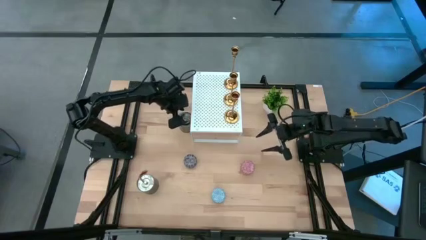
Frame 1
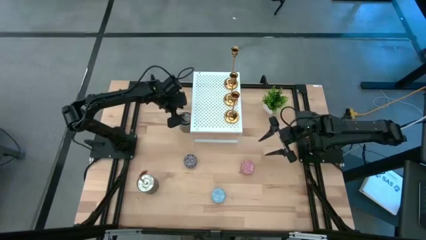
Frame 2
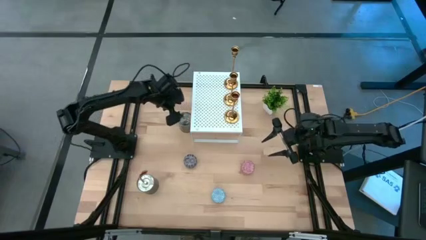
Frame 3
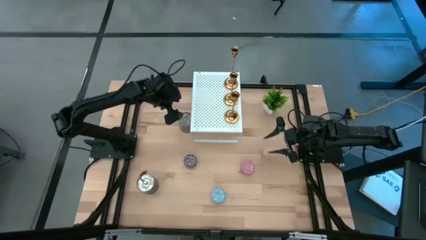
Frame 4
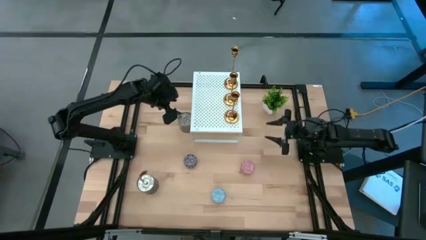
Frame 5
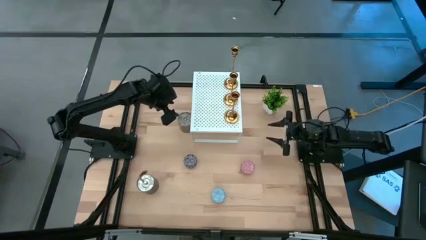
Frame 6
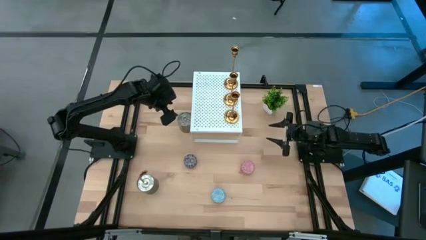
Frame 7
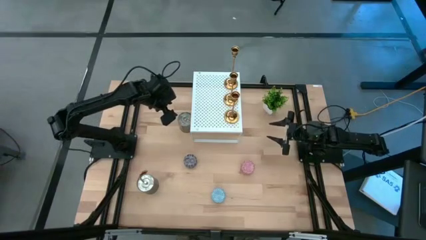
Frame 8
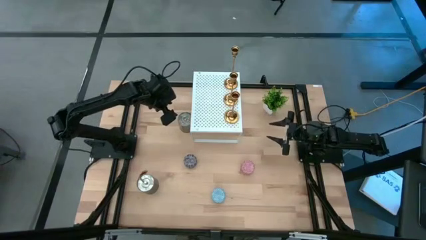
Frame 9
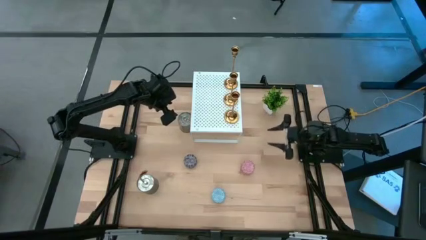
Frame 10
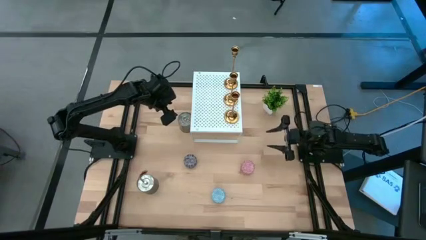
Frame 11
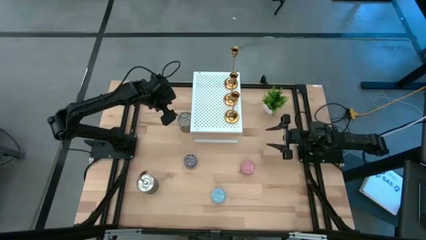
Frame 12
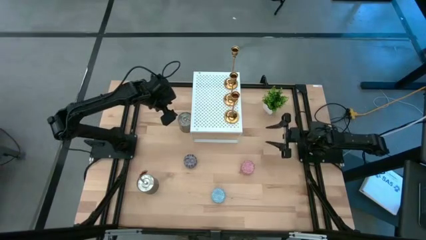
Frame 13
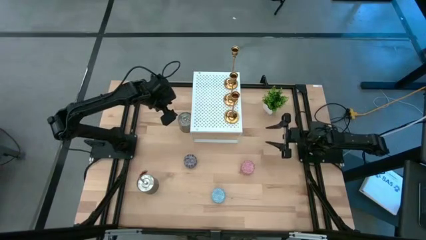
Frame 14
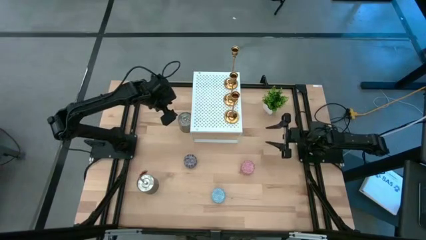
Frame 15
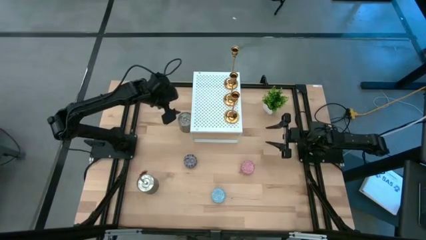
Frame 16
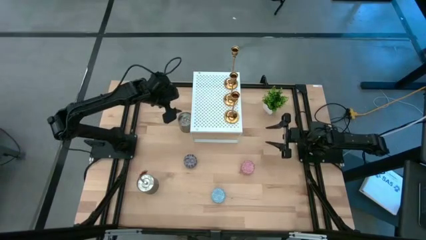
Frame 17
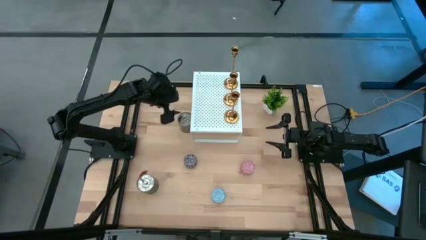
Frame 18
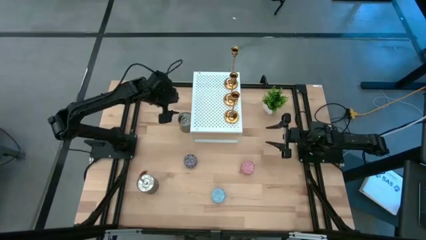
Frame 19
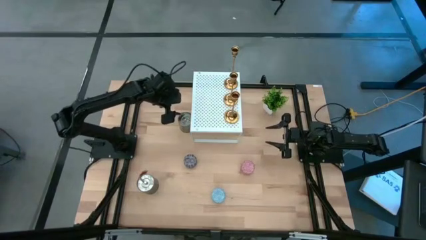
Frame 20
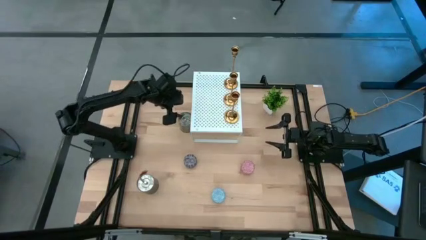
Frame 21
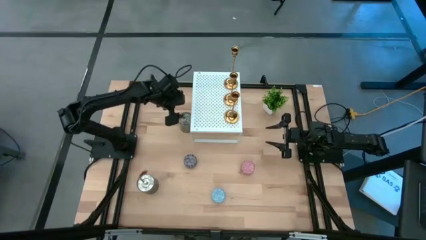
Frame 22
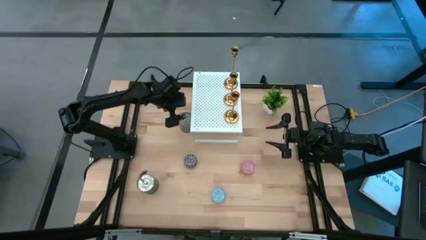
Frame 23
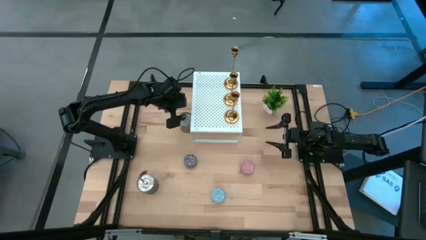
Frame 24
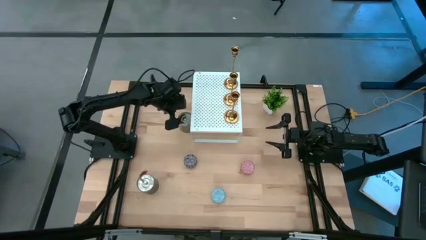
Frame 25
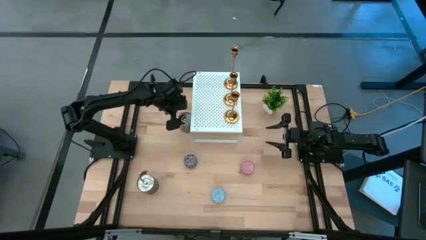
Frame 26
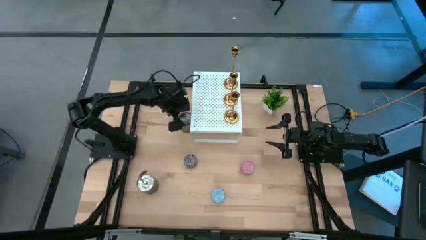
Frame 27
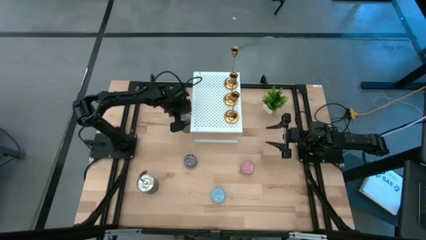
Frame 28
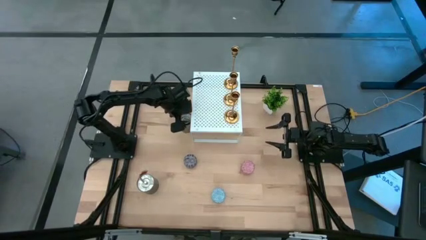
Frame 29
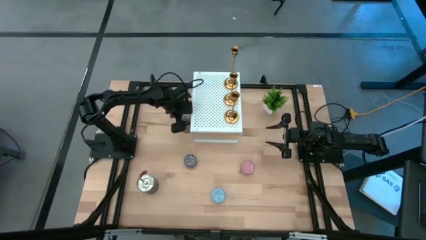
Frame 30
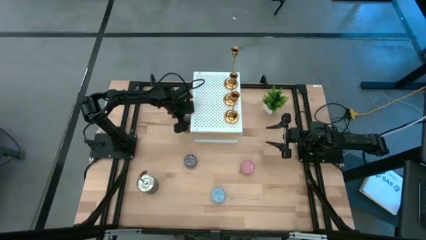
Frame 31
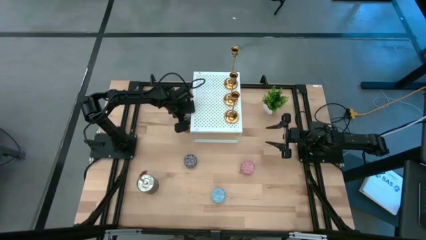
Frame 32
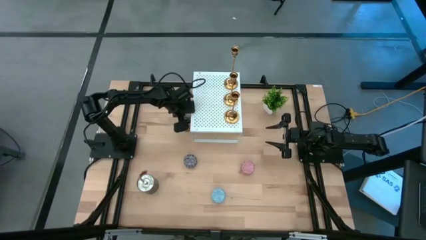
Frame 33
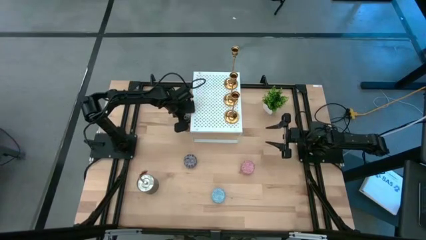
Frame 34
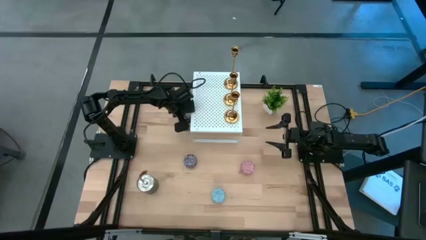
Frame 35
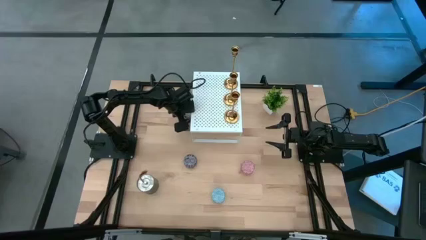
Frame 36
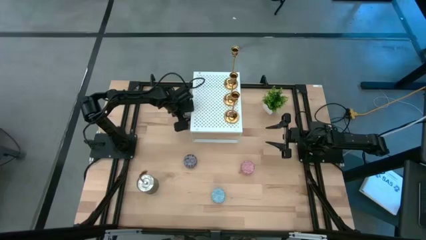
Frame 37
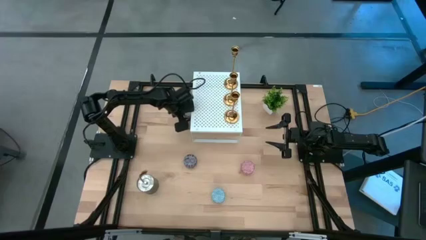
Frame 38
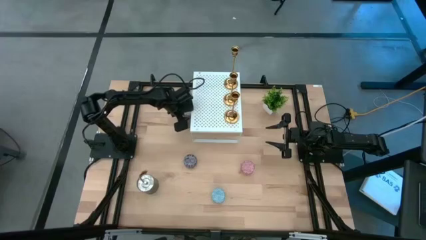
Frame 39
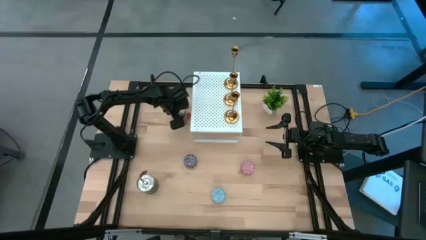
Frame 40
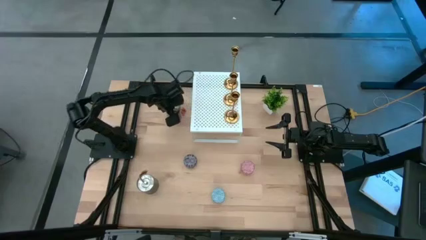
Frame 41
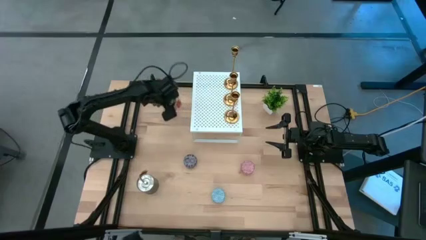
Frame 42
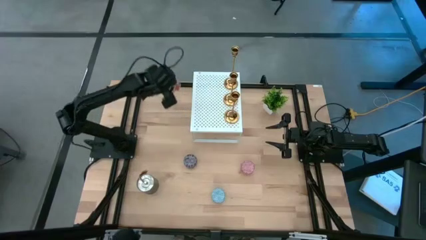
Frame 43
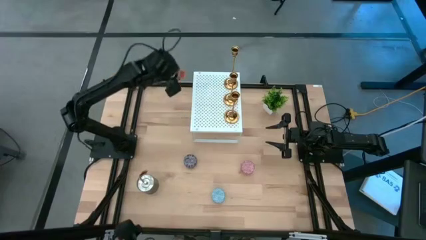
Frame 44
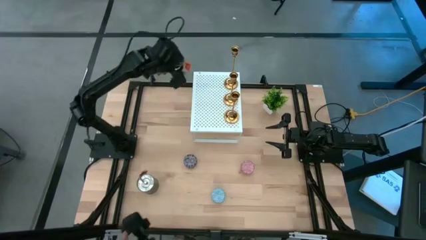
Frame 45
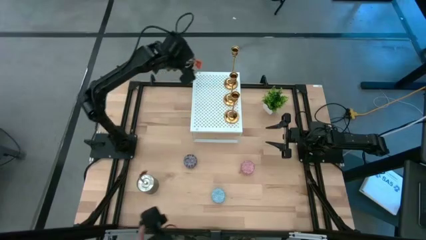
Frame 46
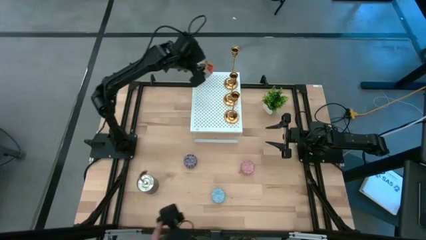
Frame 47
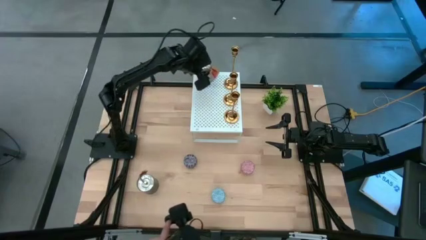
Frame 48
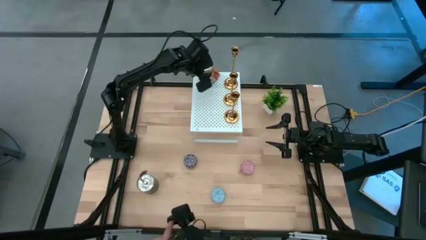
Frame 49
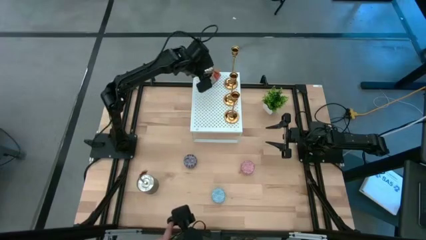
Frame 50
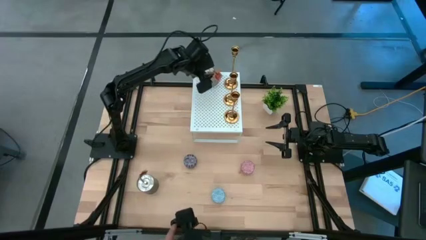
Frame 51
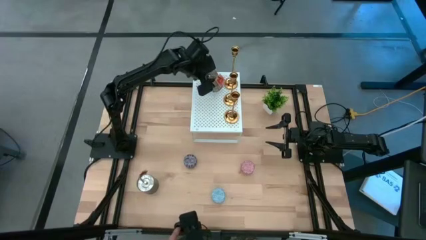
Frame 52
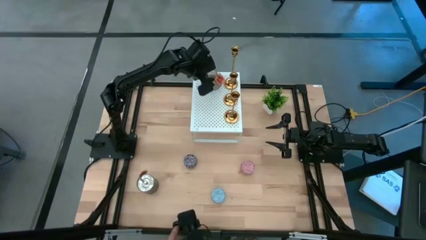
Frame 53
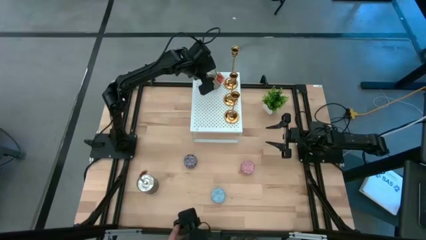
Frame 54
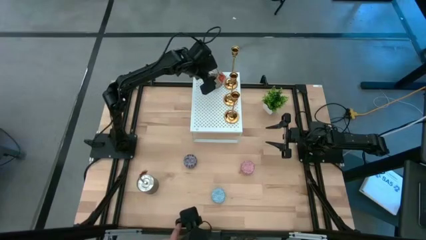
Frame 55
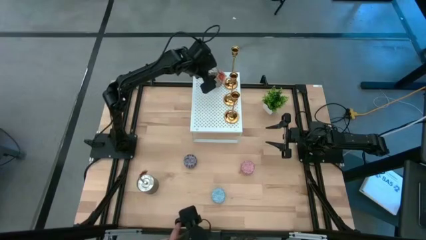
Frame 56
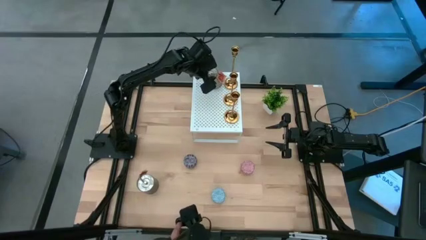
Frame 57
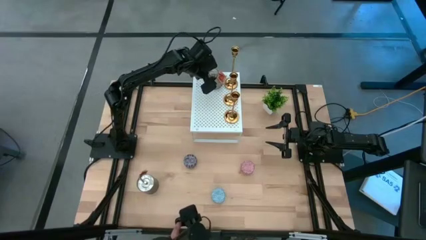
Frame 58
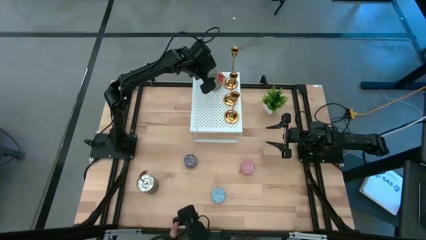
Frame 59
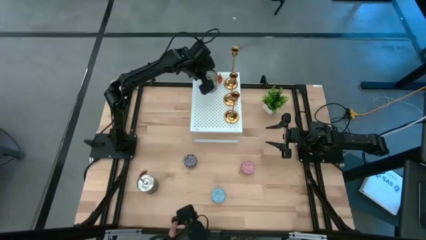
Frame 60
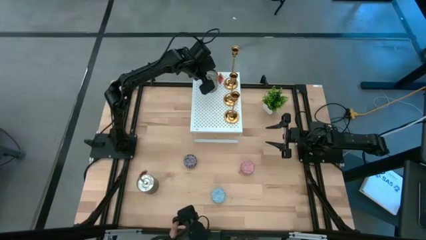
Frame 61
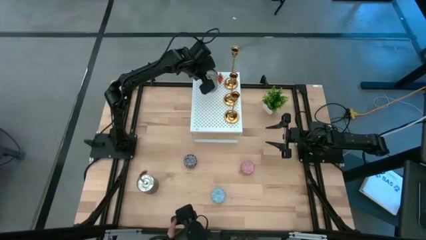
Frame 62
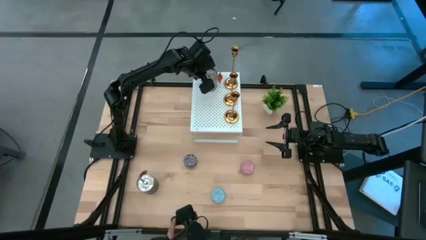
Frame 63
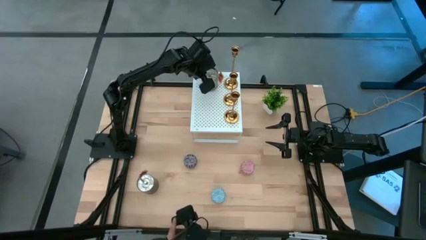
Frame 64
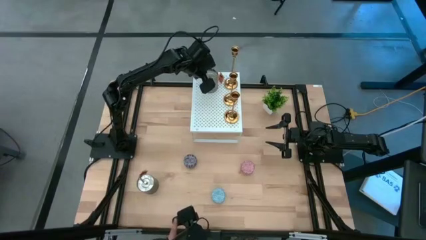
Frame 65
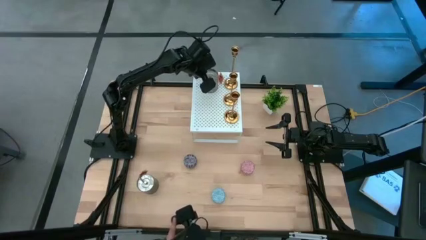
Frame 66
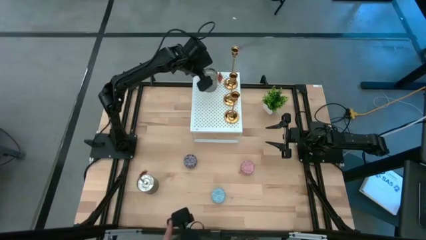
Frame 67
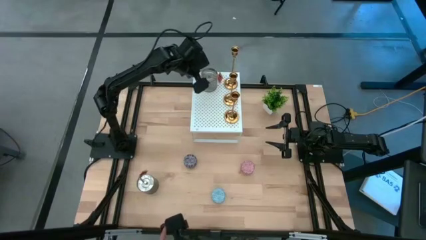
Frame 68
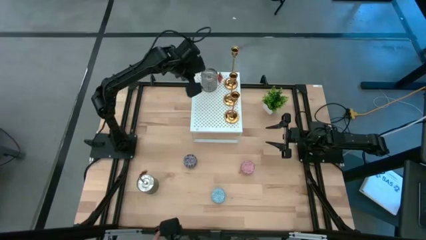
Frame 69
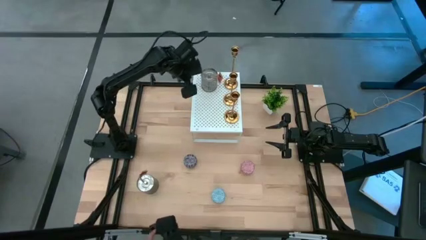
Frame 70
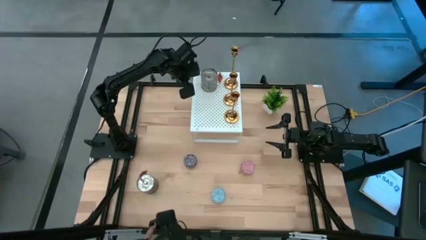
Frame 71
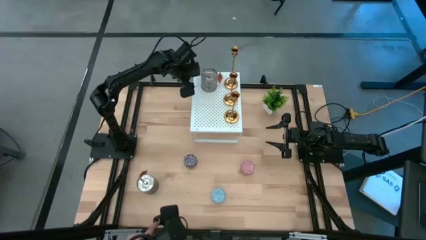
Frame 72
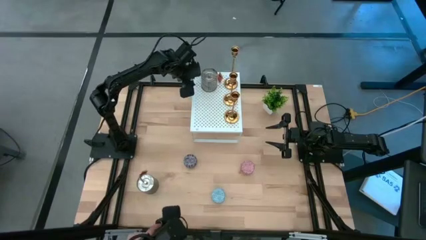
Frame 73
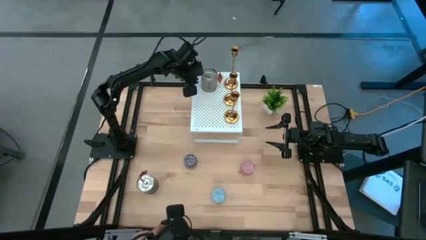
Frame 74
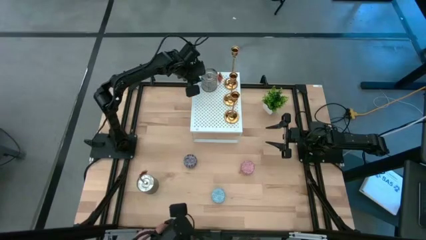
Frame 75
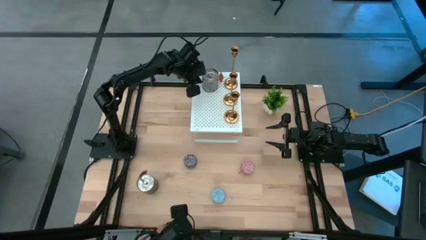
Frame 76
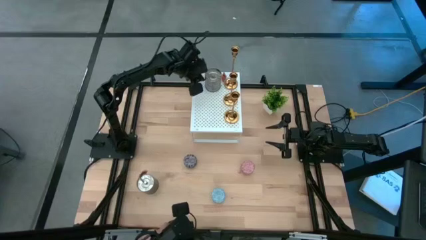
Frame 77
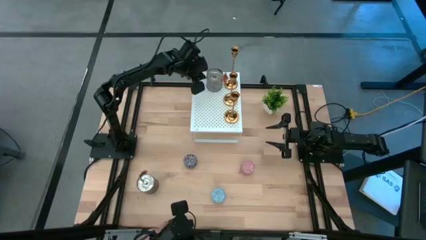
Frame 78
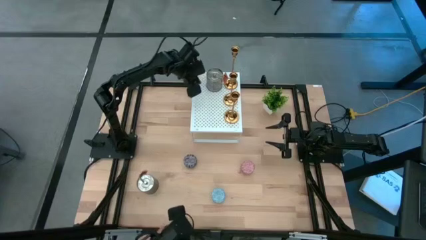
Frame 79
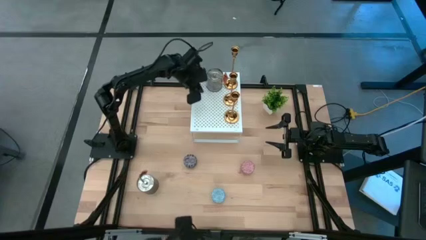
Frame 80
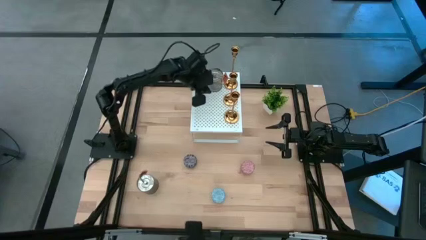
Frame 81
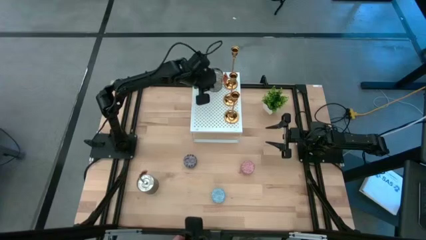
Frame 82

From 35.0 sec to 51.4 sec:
Task: Pick & Place candle stick holders
Put the top silver scented candle can on the shelf
